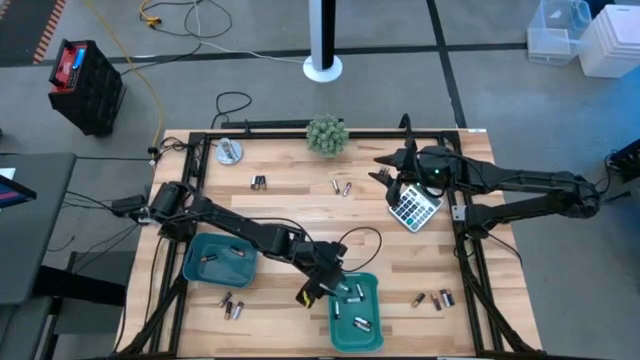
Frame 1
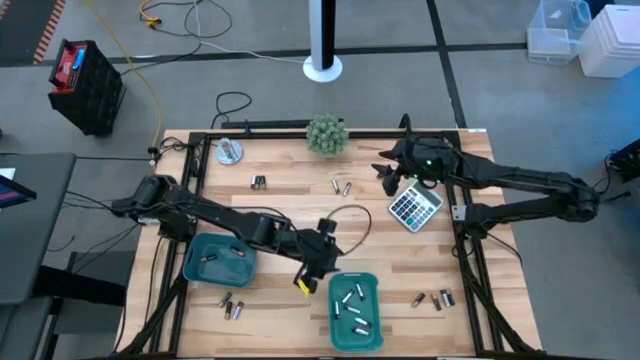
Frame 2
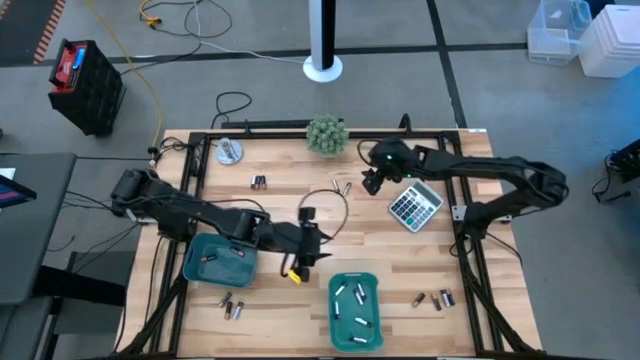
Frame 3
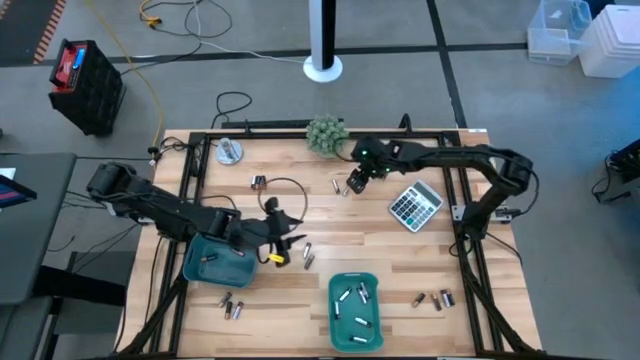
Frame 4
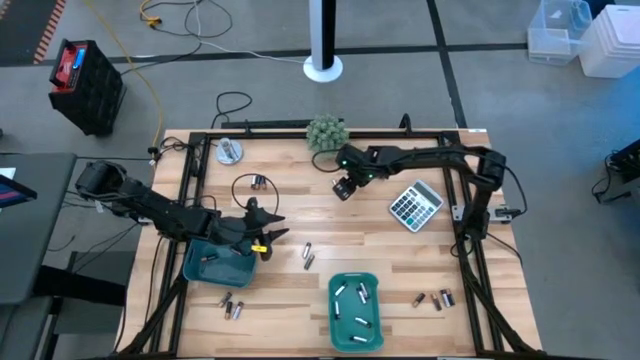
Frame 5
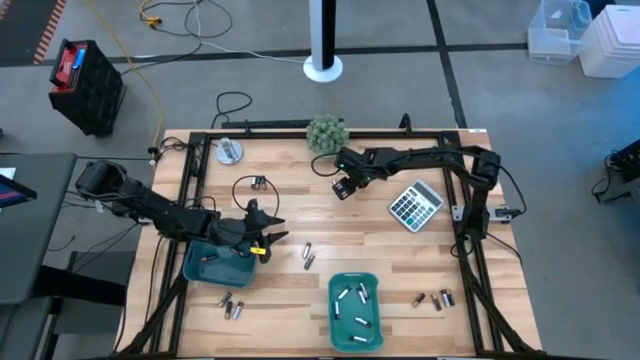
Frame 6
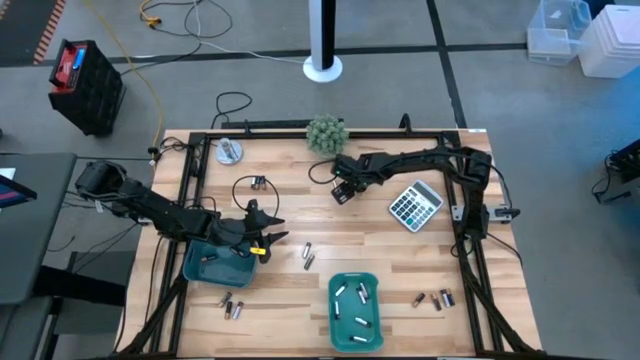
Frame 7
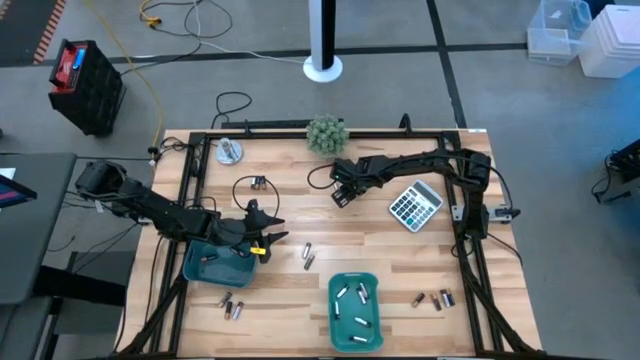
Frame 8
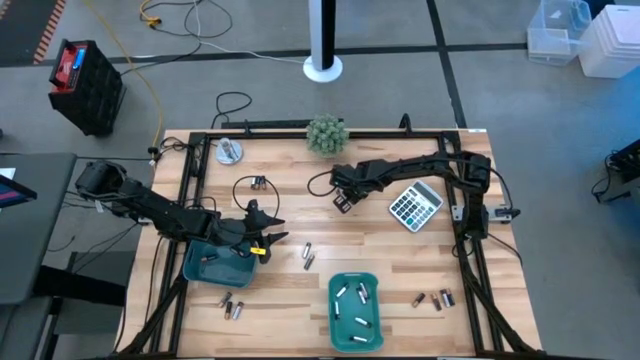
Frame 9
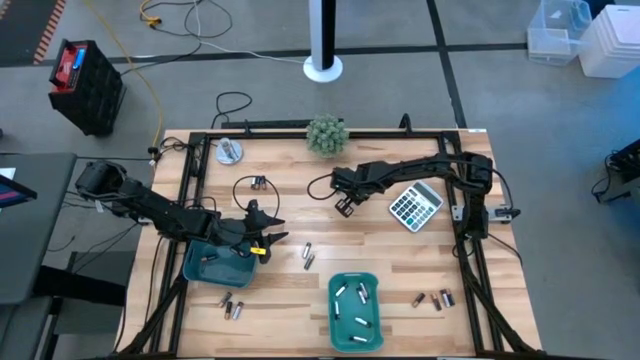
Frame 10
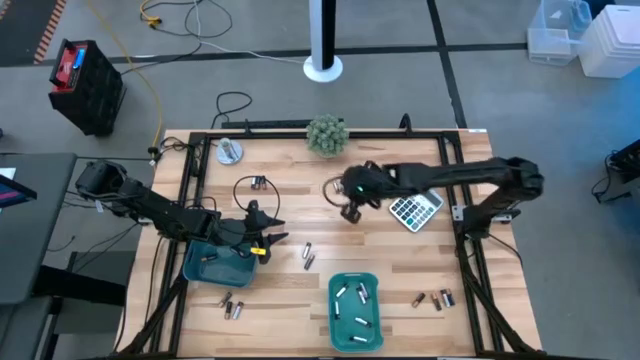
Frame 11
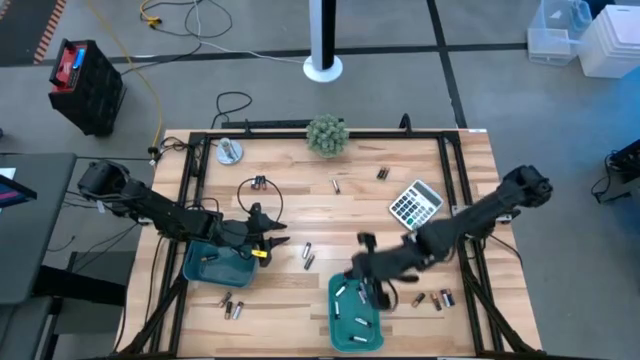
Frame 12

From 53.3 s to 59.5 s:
Task: Sort batteries
Put the silver battery into the green bin

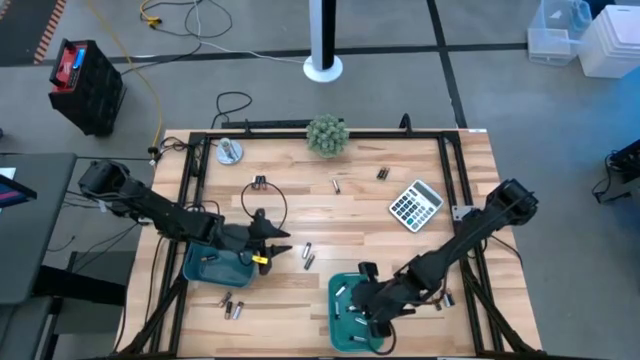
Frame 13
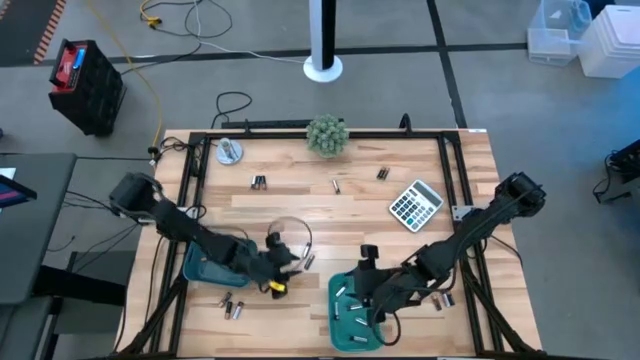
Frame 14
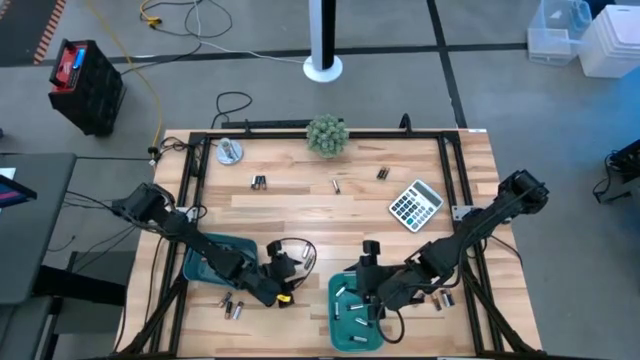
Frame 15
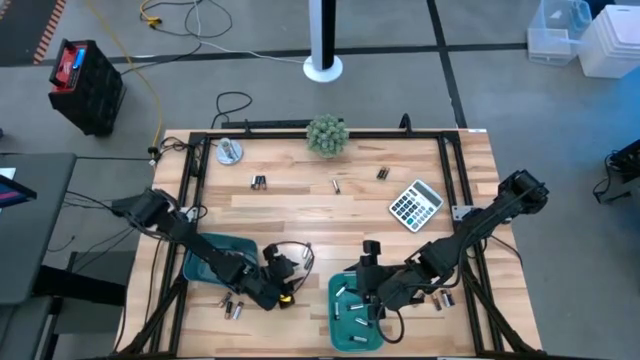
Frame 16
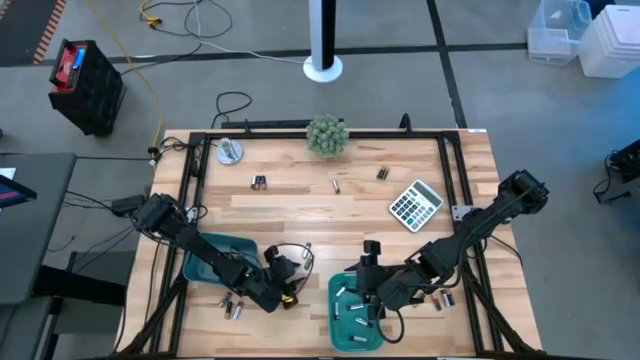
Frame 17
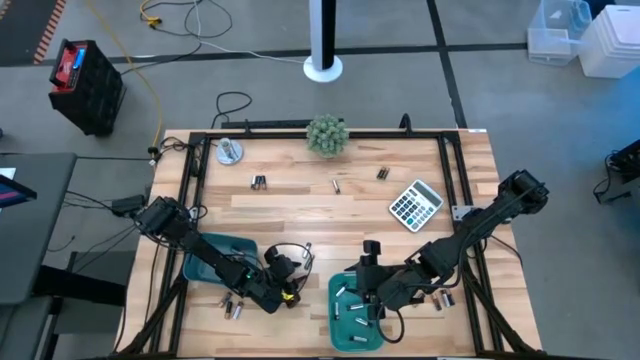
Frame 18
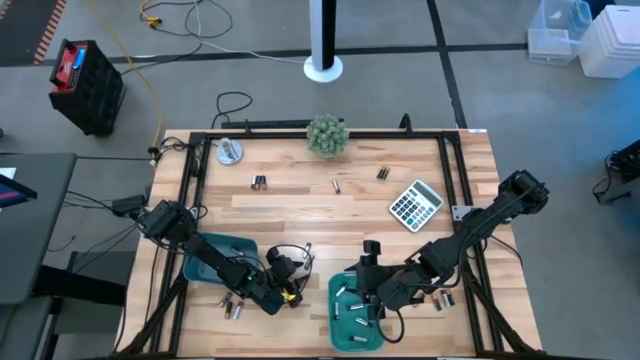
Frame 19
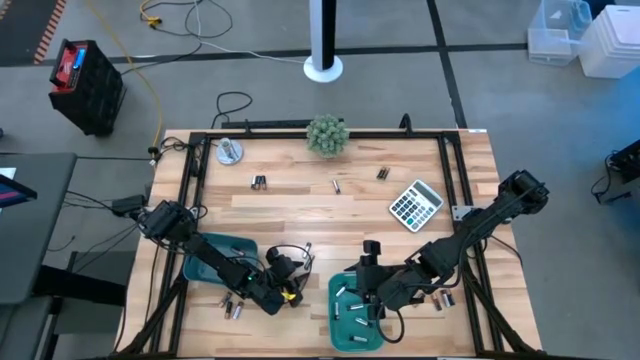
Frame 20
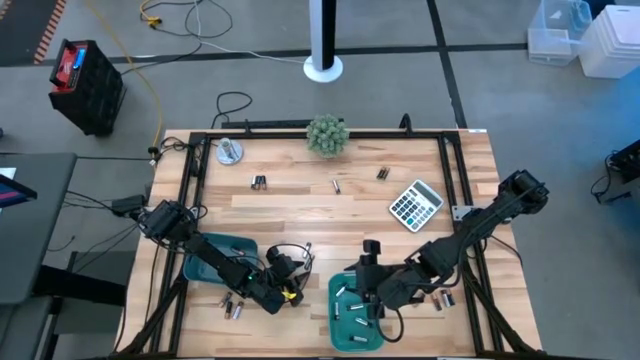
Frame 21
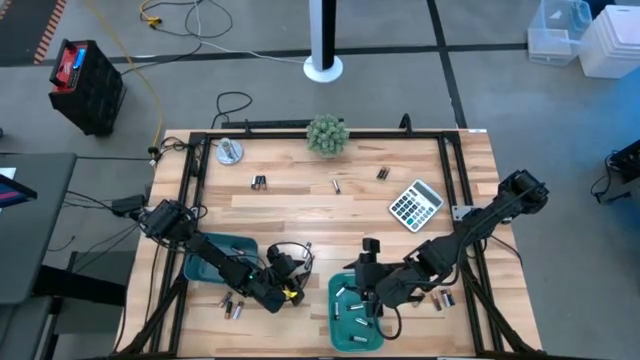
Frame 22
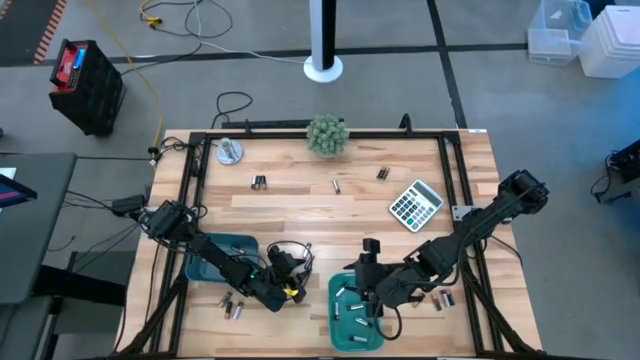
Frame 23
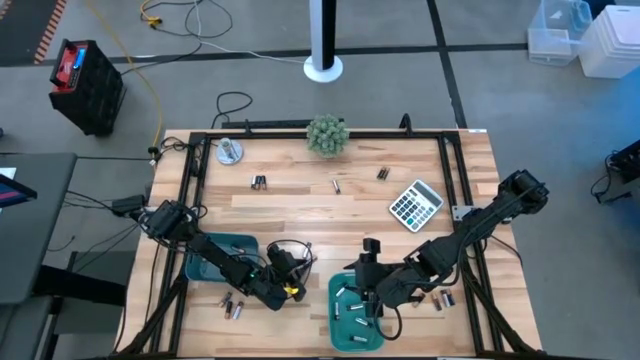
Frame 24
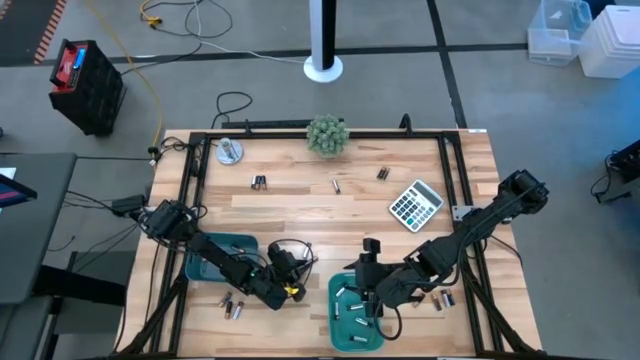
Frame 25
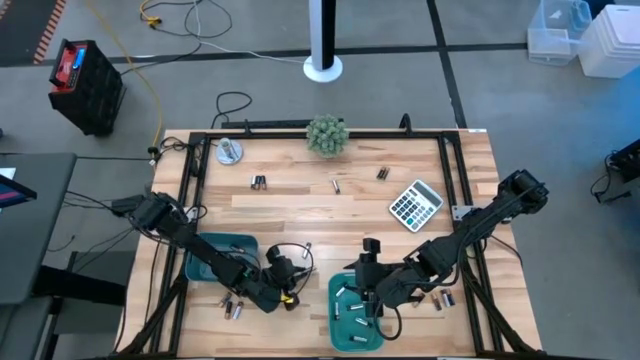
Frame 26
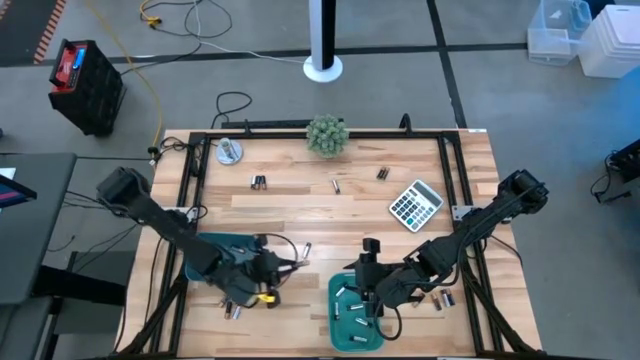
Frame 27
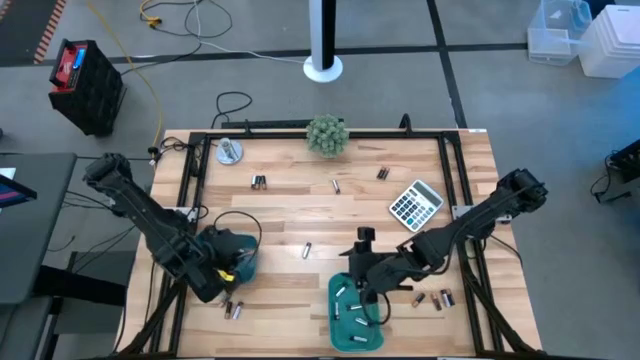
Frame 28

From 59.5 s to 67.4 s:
Put the black battery into the blue bin

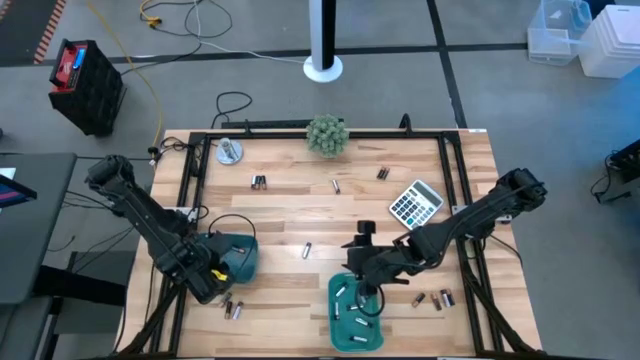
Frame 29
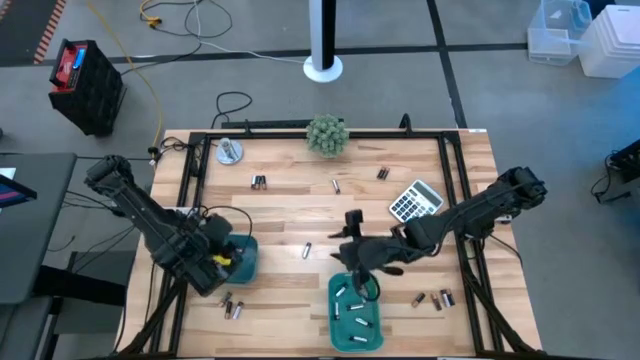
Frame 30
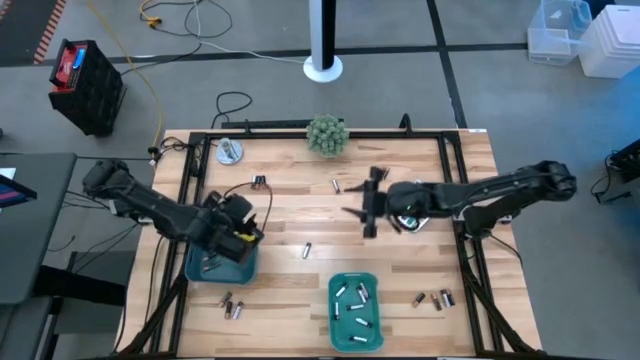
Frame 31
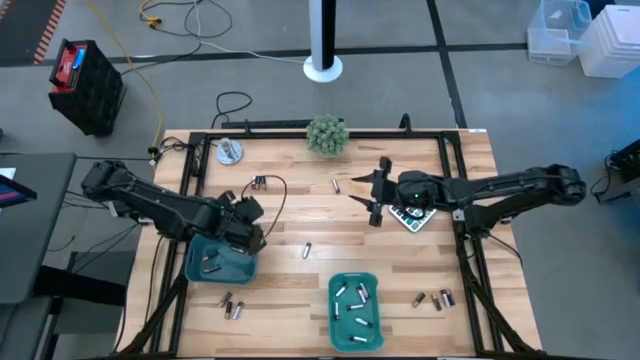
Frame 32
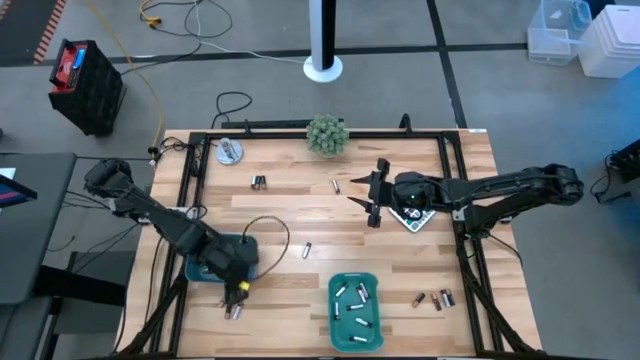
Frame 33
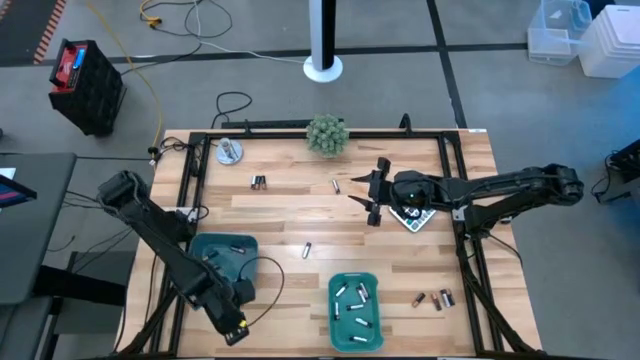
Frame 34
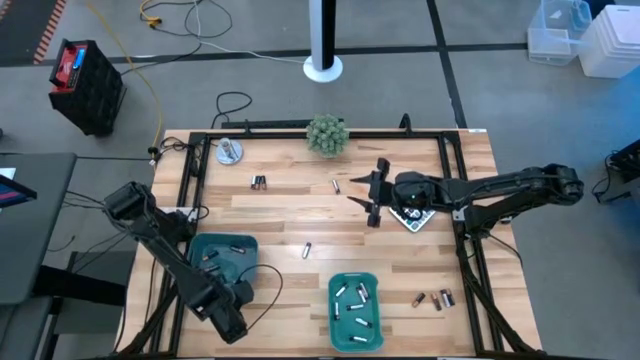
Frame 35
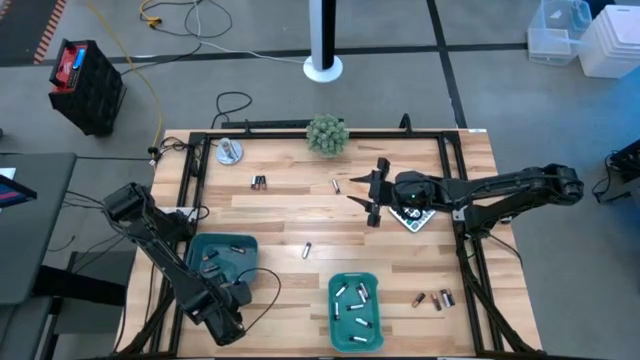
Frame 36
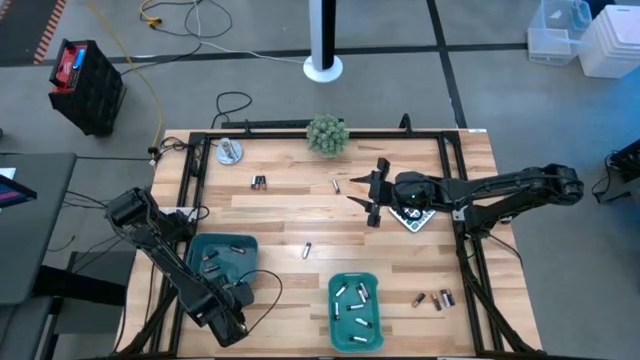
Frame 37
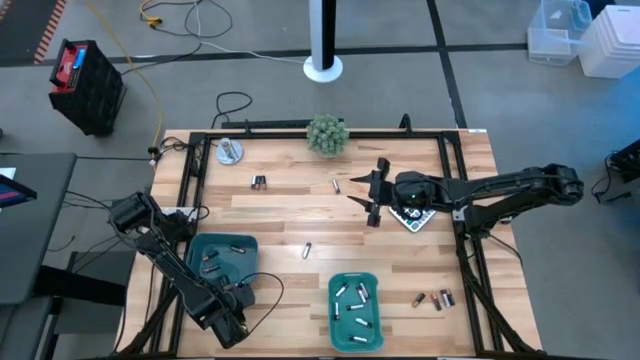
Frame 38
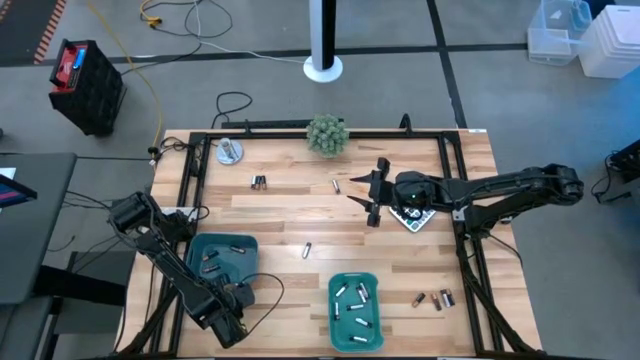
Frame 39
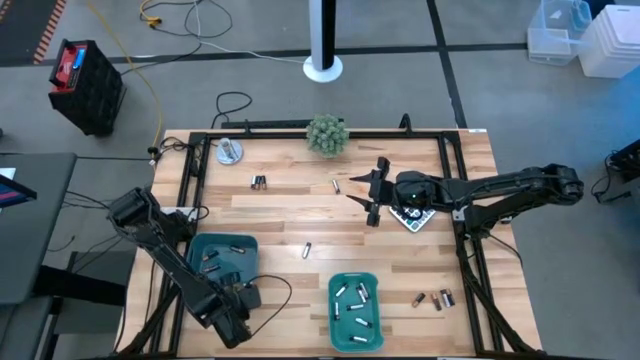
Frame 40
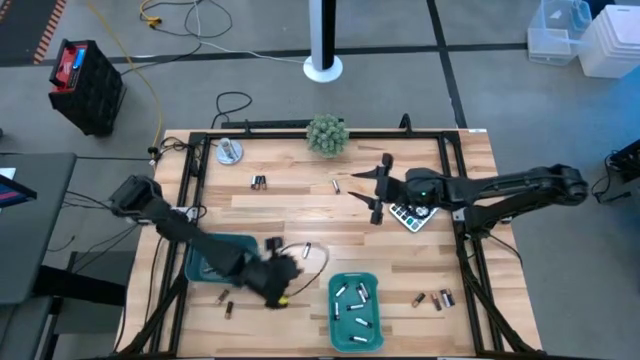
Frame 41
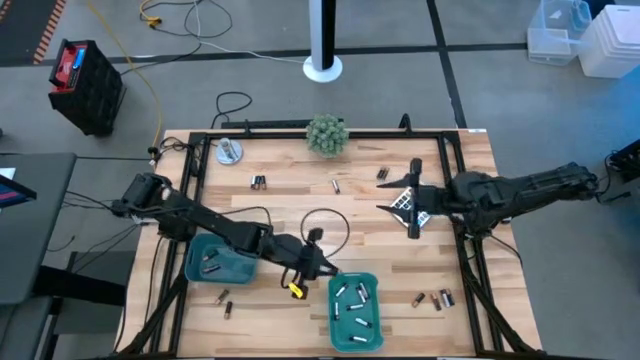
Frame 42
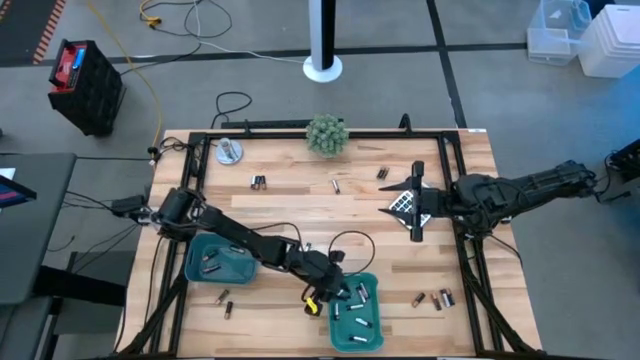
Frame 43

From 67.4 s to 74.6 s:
Put the silver battery into the green bin

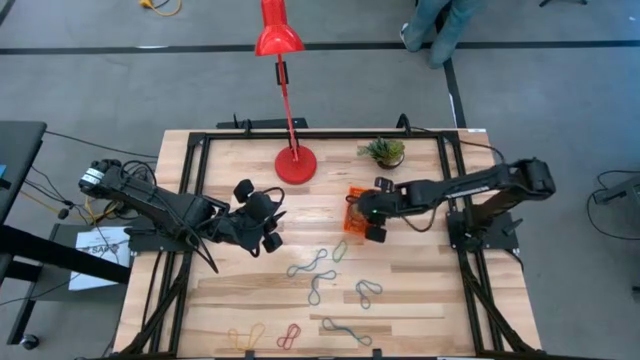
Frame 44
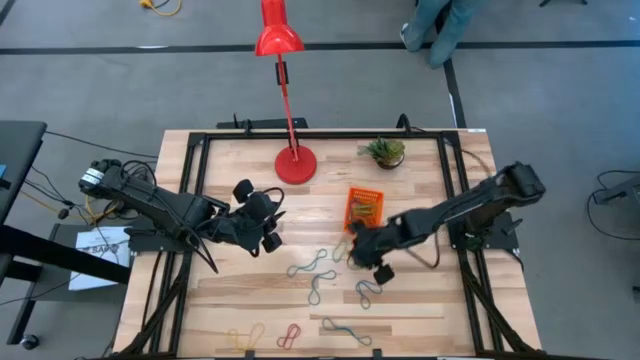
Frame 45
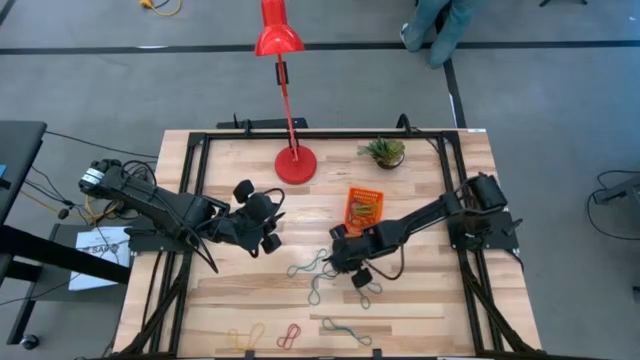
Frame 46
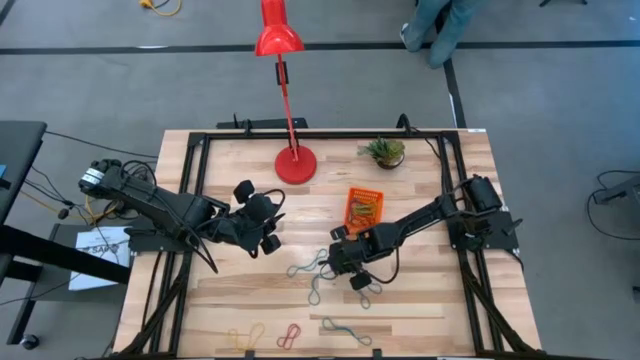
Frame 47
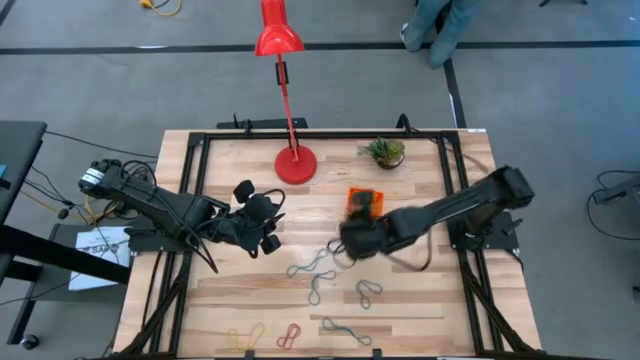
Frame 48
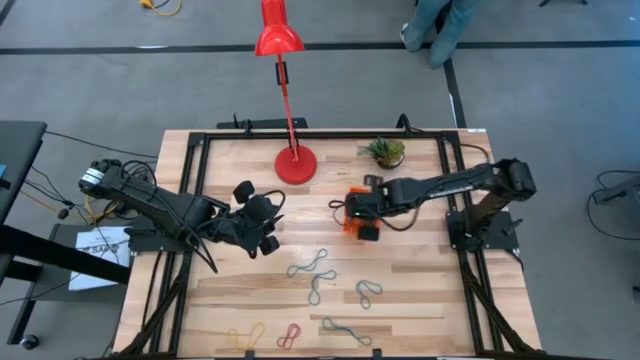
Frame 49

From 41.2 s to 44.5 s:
Task: Pick and place items into bin
Put the green rubberband into the orange basket
